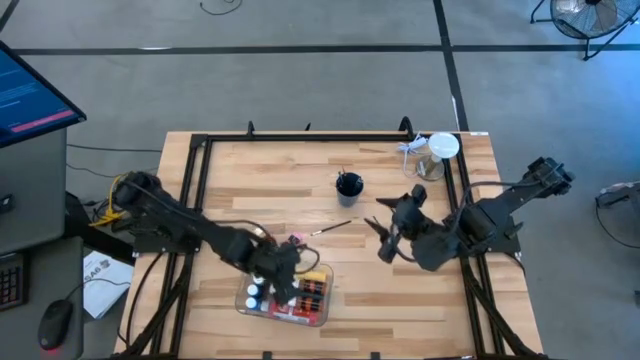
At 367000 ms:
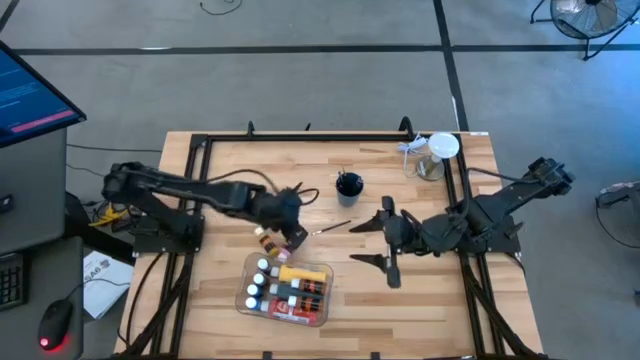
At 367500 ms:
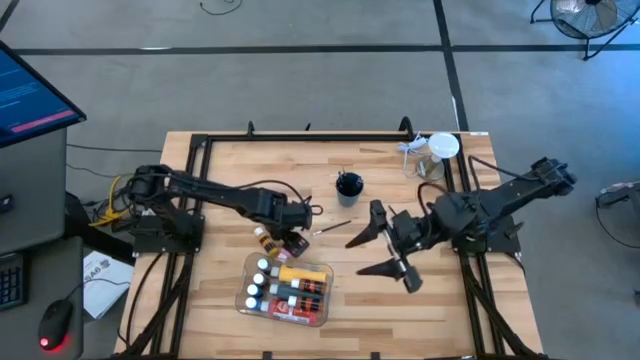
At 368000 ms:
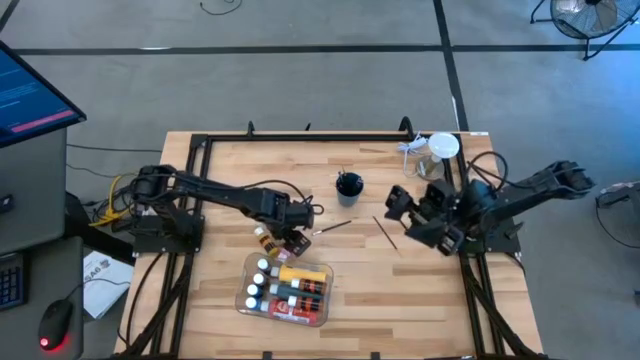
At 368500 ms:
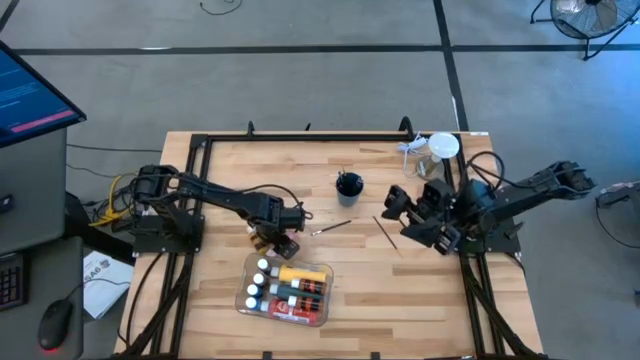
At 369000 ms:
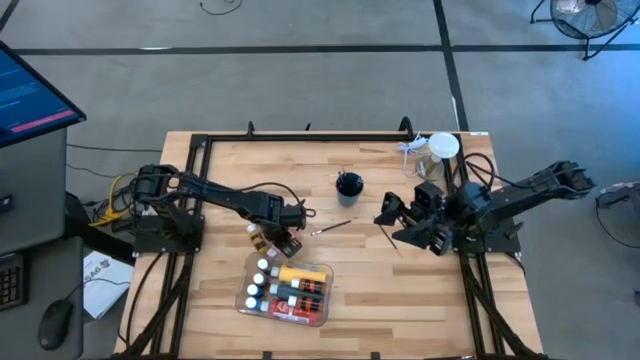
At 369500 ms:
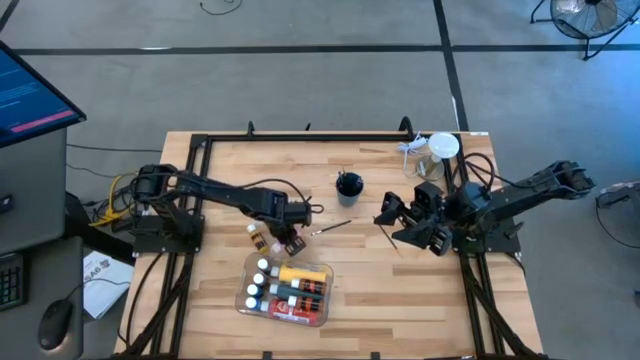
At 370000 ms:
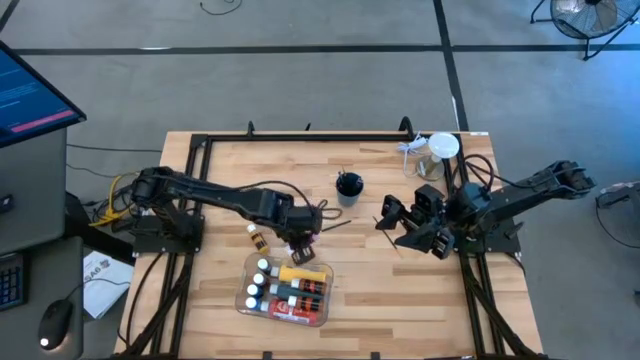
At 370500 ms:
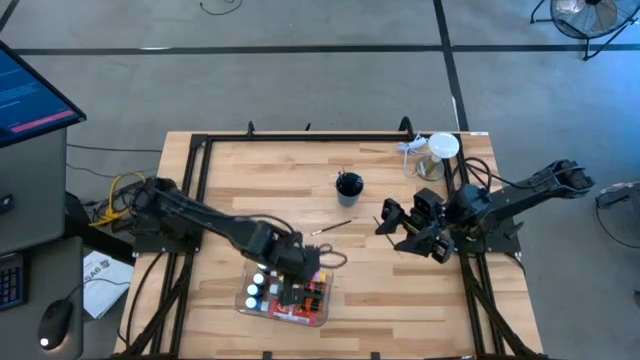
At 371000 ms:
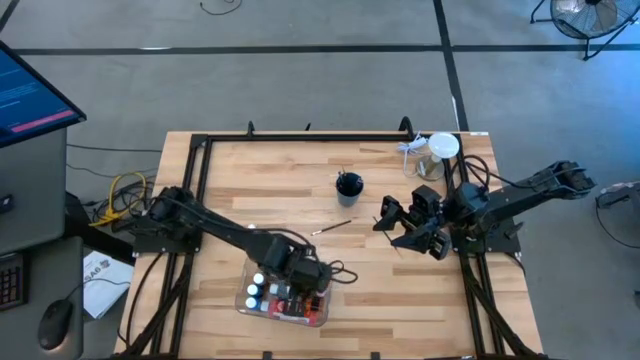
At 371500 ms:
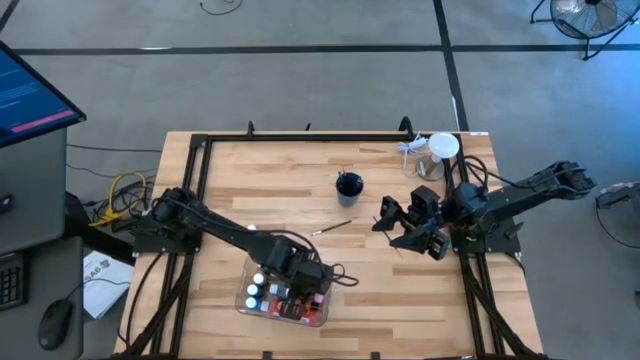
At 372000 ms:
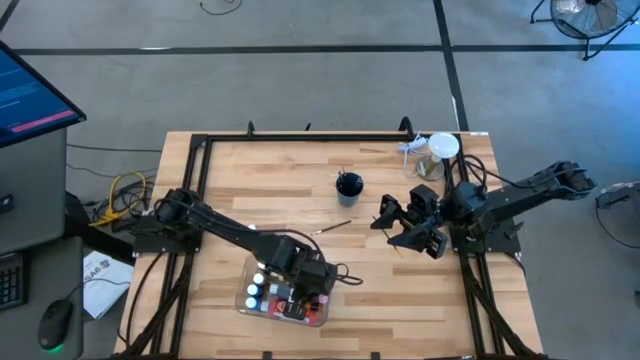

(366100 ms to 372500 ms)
Task: Pick & Place Paint Supplies
Put the small pink paint bottle into the transparent bin

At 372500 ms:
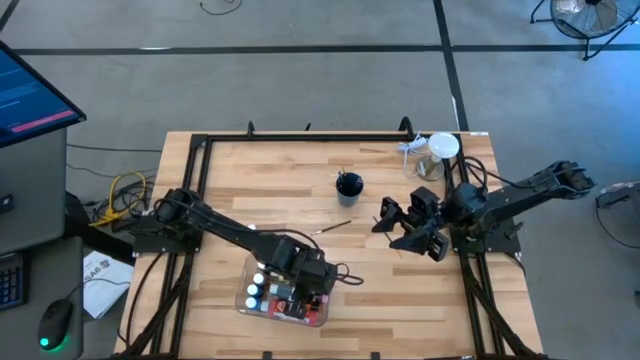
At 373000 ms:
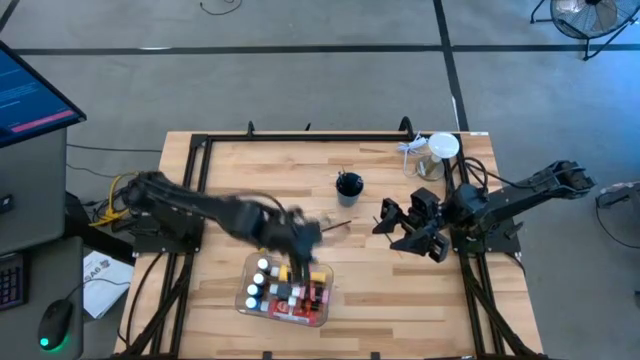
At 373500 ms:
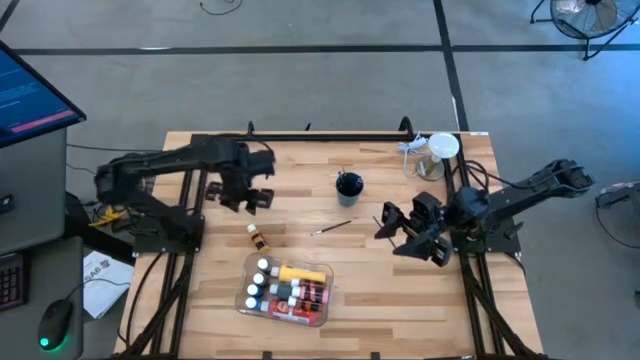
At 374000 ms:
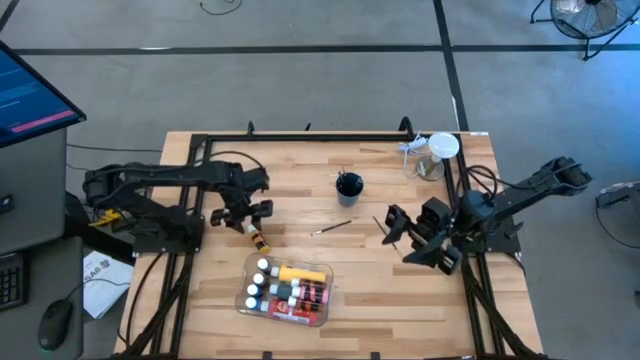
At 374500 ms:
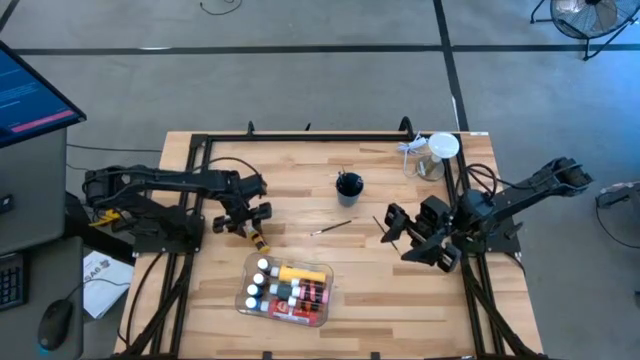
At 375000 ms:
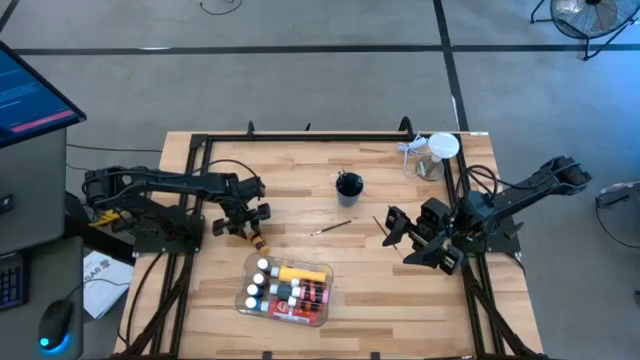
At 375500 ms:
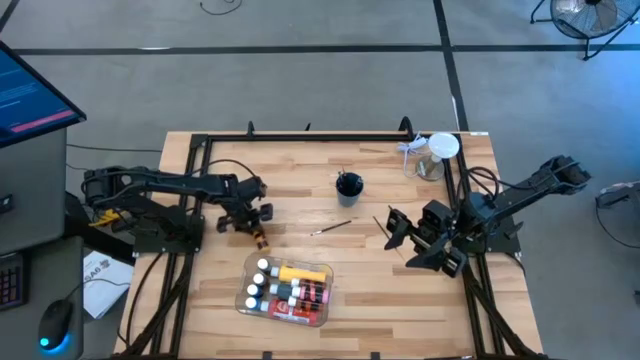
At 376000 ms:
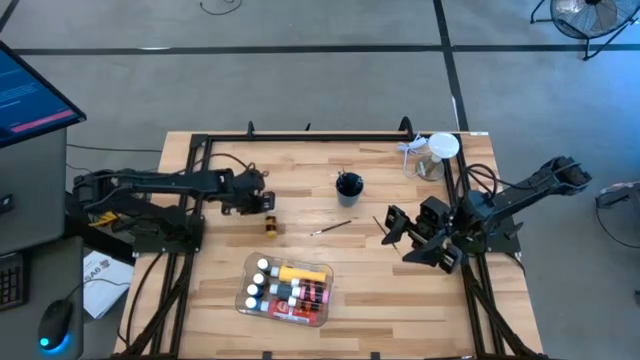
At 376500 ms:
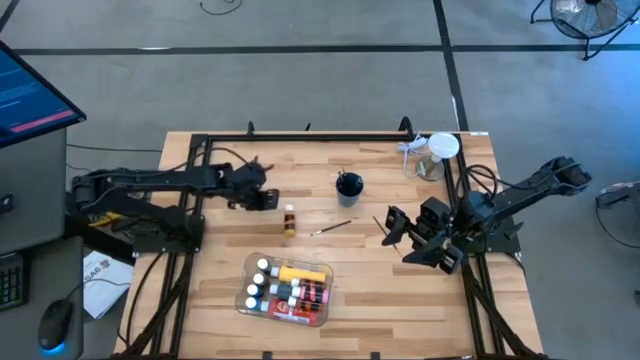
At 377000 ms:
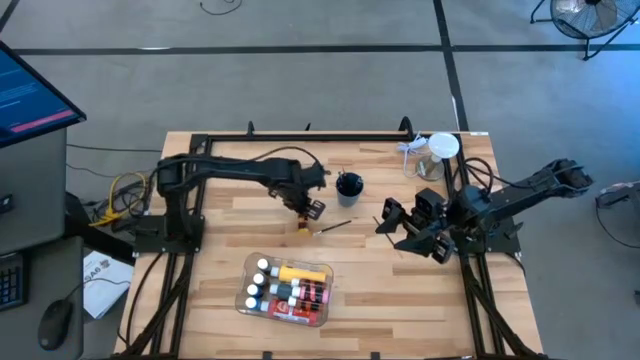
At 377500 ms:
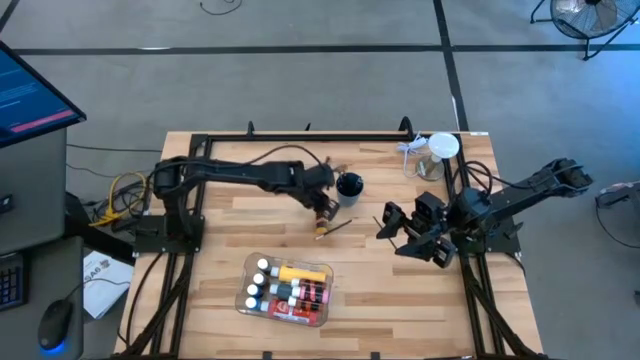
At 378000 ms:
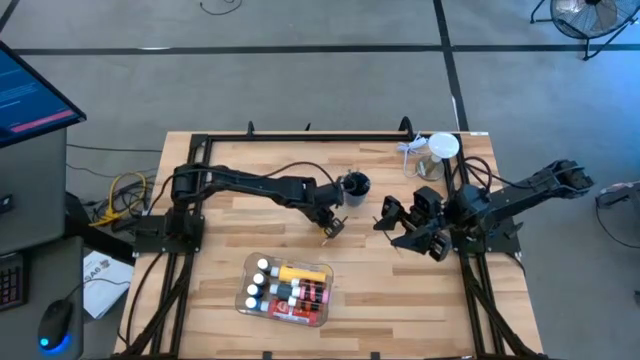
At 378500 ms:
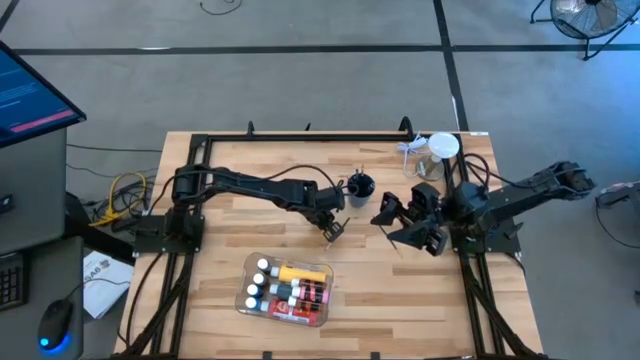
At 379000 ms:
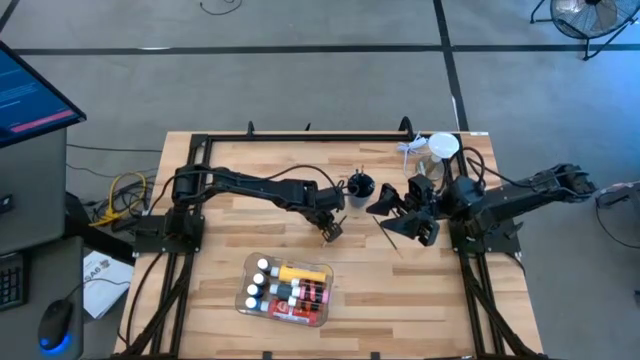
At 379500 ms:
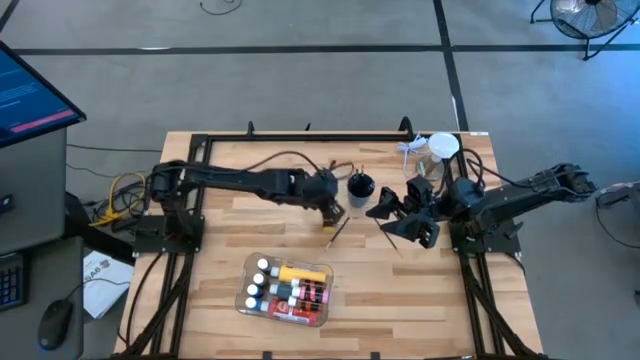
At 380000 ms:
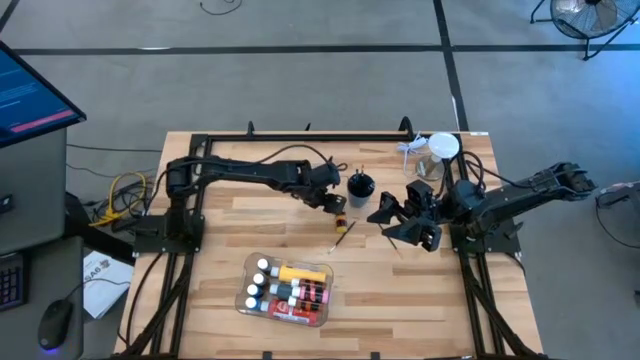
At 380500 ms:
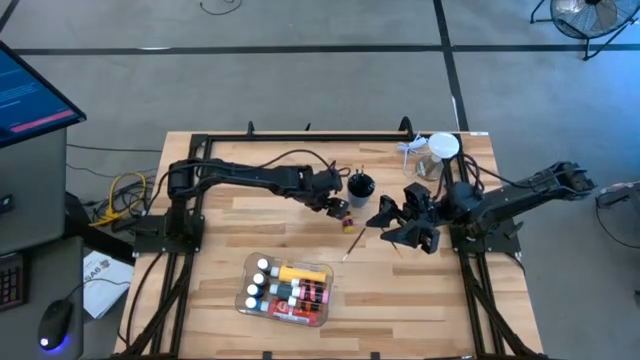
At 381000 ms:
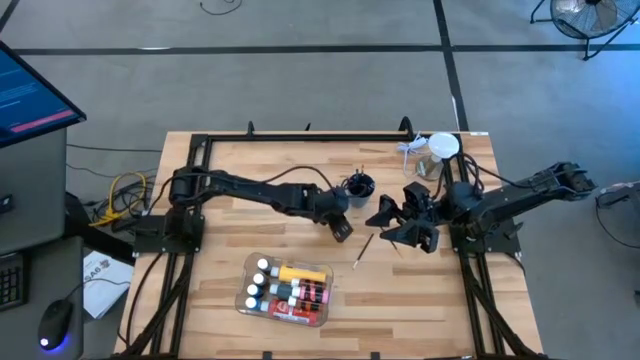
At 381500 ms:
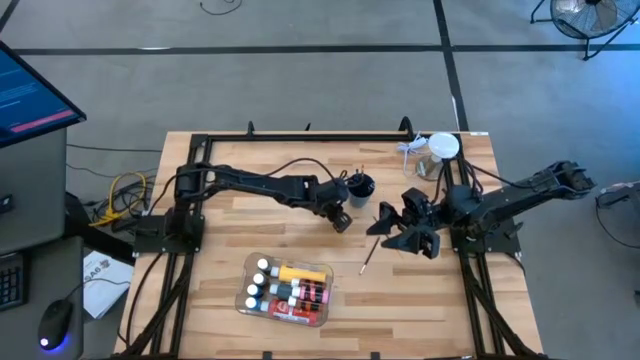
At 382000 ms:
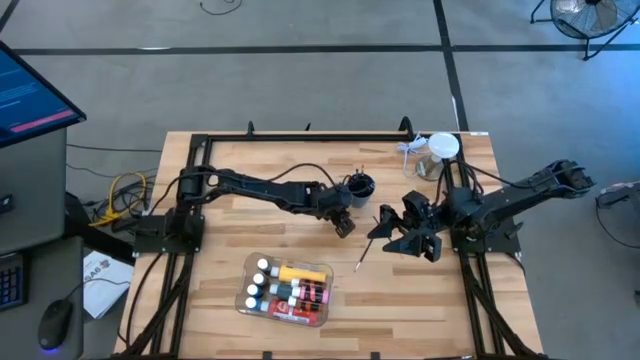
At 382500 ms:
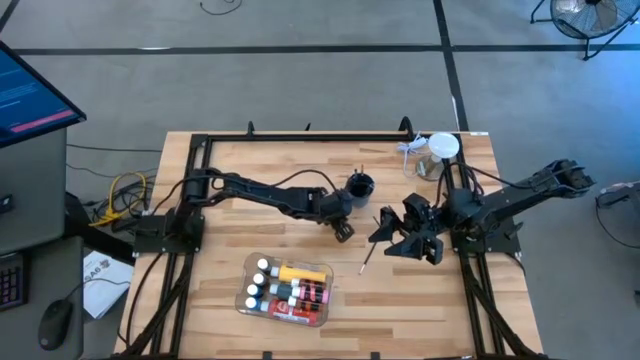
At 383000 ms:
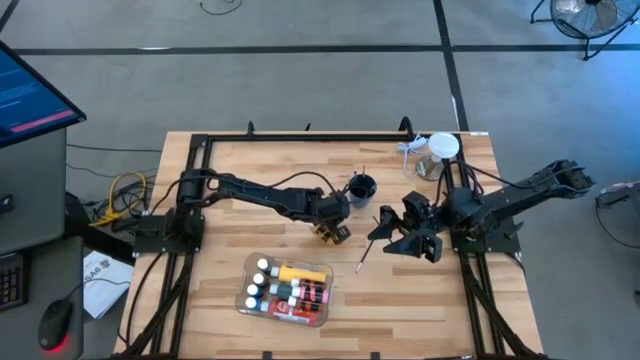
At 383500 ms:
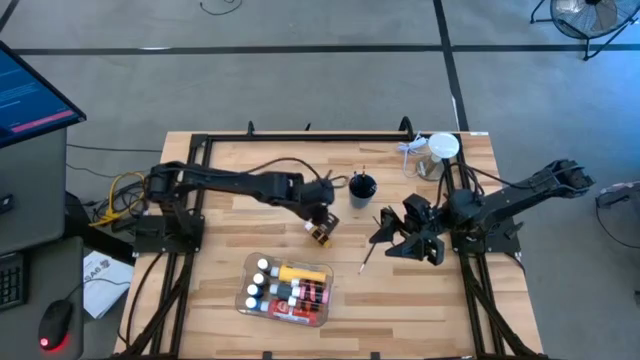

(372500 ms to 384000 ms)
Put the small yellow paint bottle into the transparent bin

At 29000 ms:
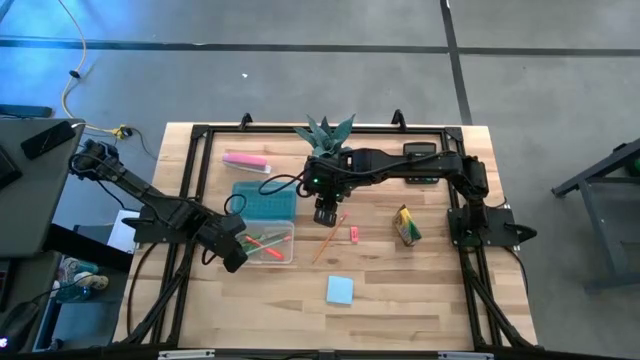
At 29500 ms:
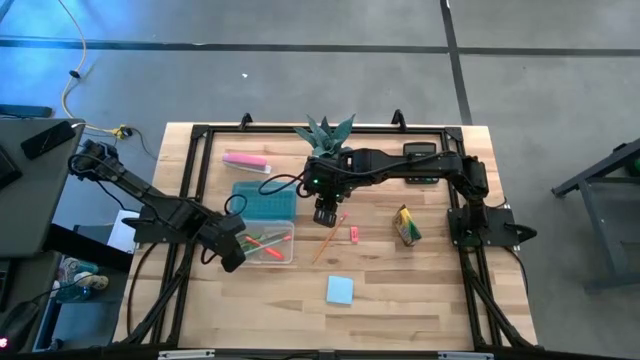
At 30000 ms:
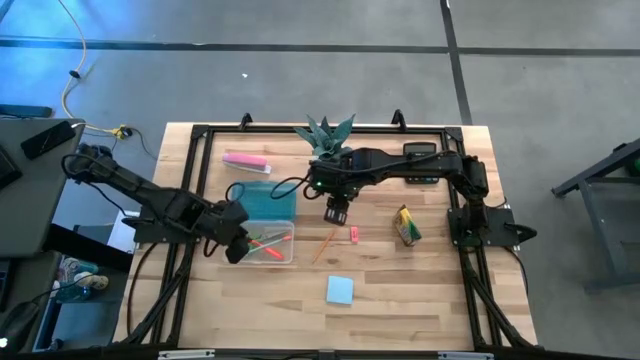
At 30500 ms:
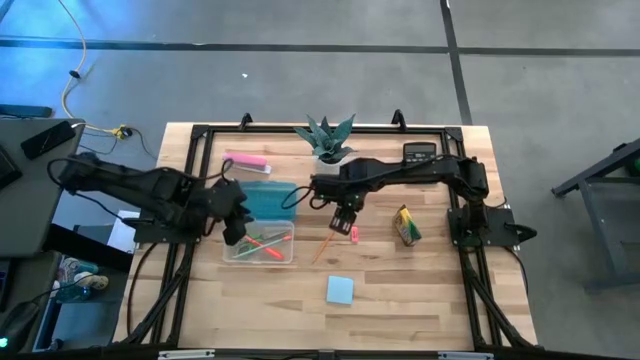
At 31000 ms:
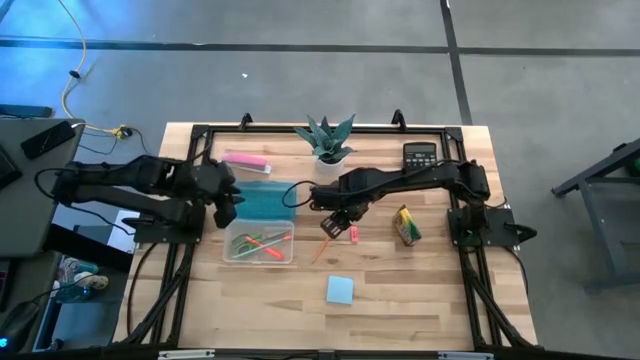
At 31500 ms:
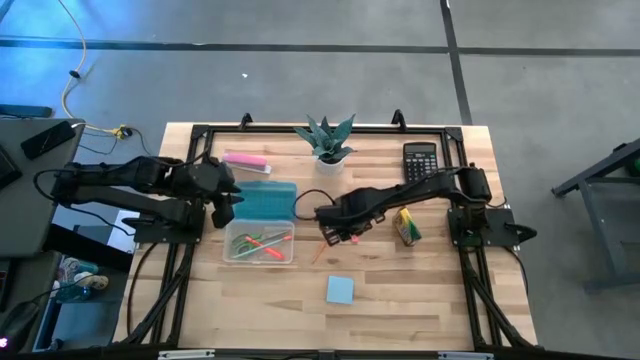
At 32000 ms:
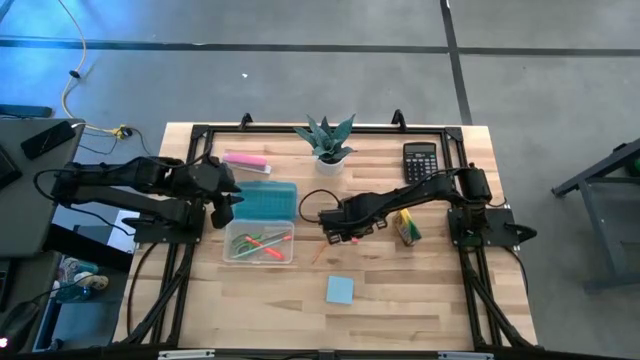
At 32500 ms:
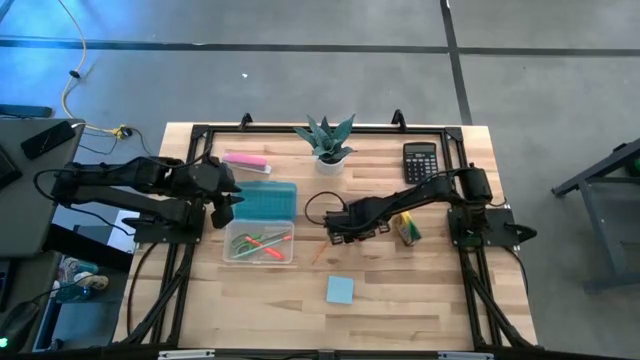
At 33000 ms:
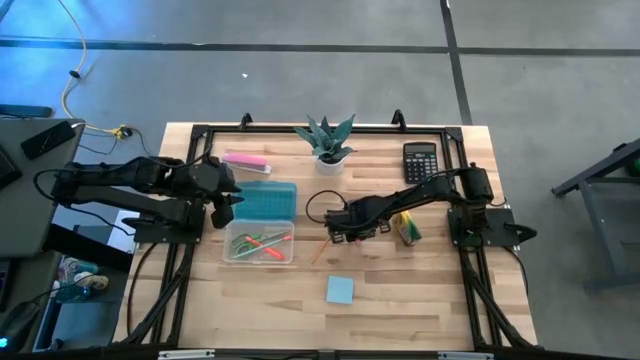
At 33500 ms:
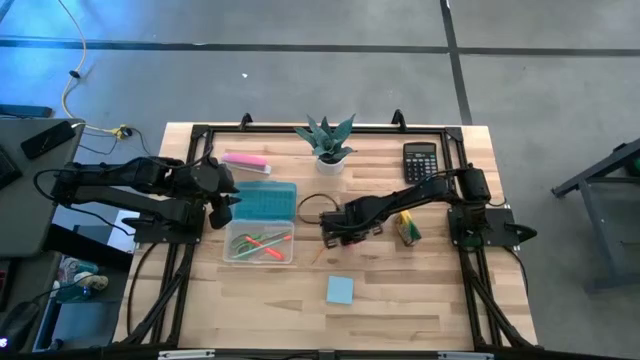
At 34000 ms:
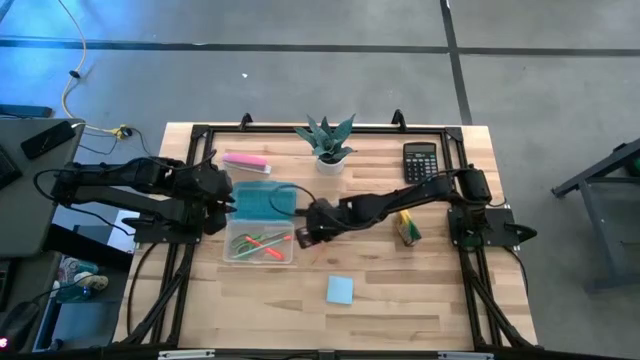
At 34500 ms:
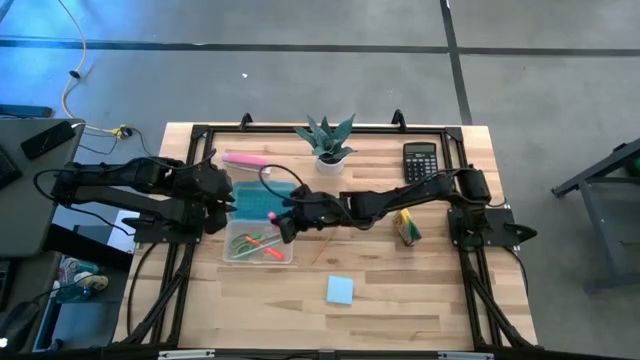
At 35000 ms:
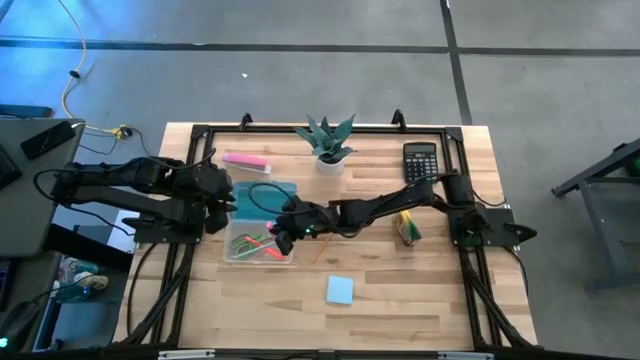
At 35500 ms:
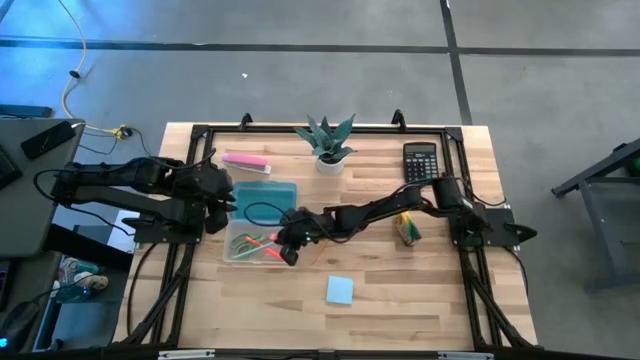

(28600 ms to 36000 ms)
Task: Pack school essentials
Put the pink eraser into the blue supply box
